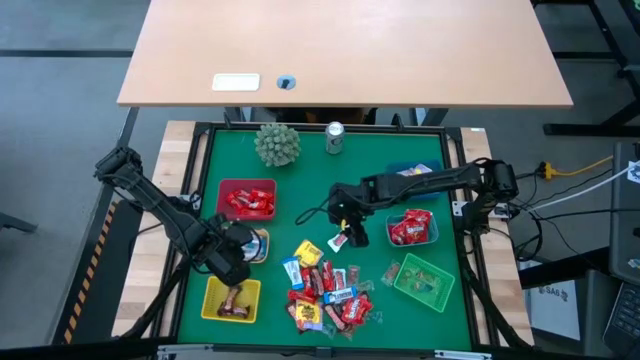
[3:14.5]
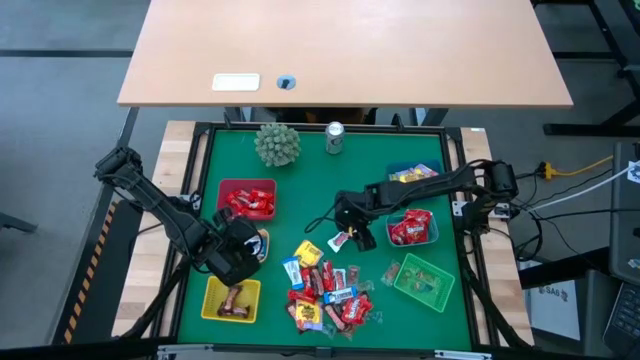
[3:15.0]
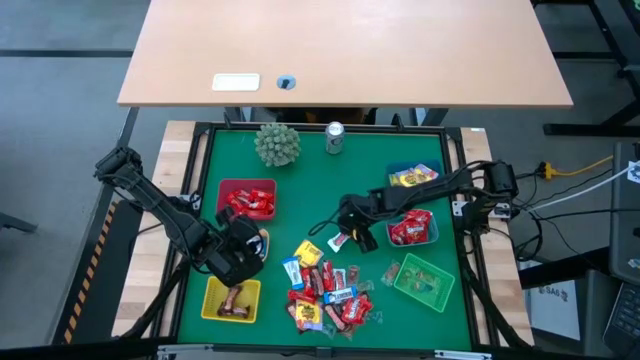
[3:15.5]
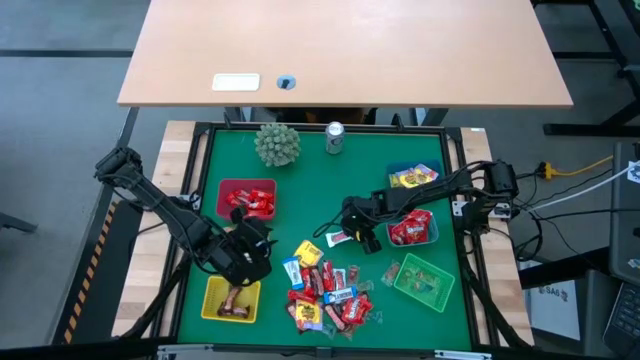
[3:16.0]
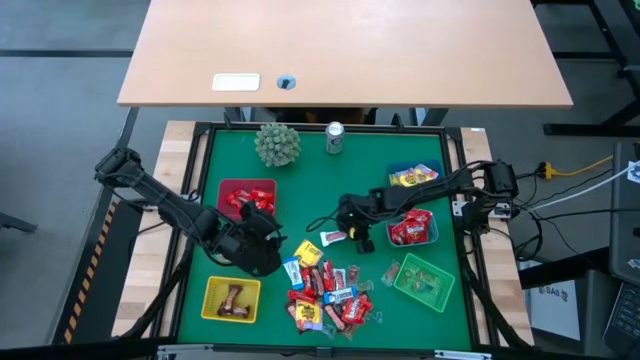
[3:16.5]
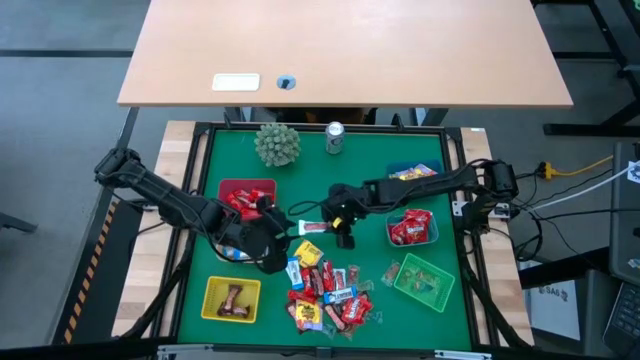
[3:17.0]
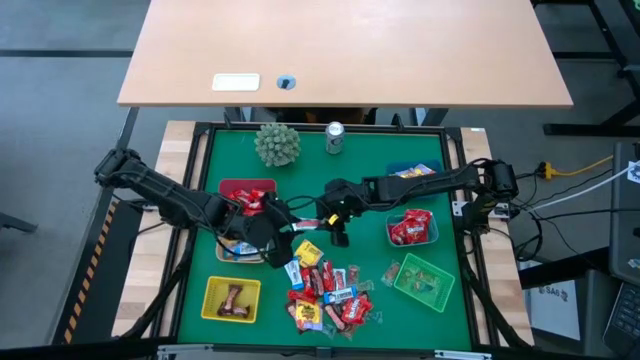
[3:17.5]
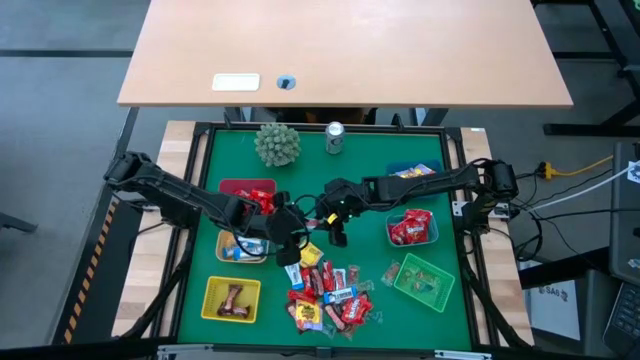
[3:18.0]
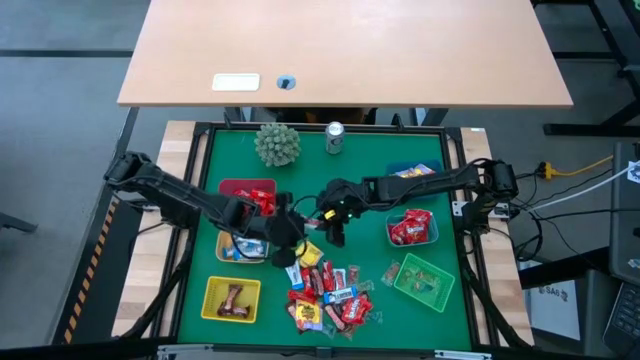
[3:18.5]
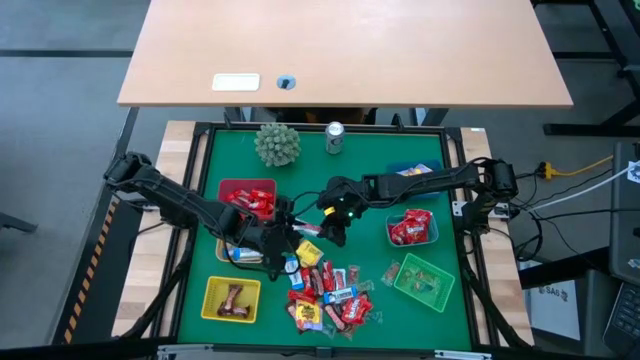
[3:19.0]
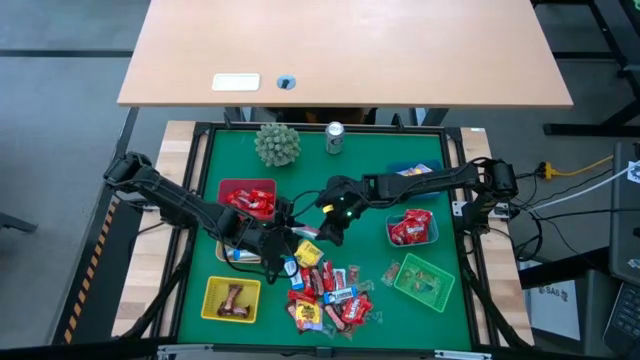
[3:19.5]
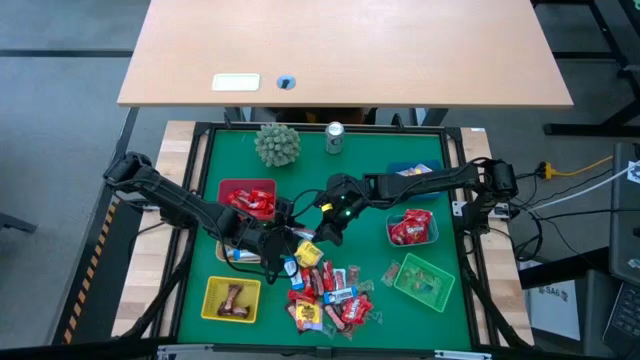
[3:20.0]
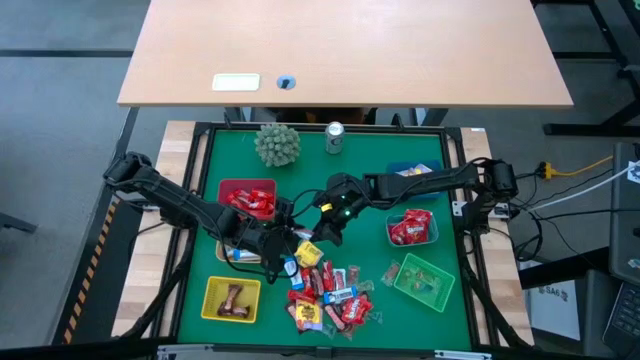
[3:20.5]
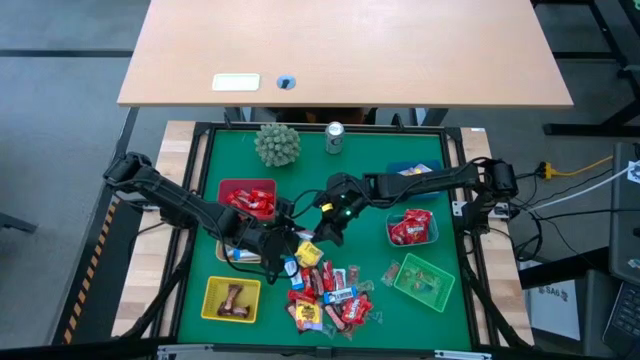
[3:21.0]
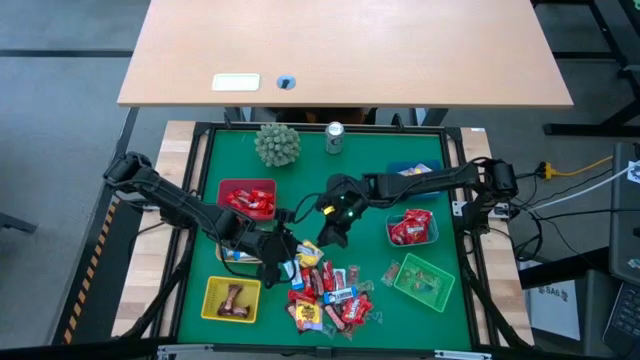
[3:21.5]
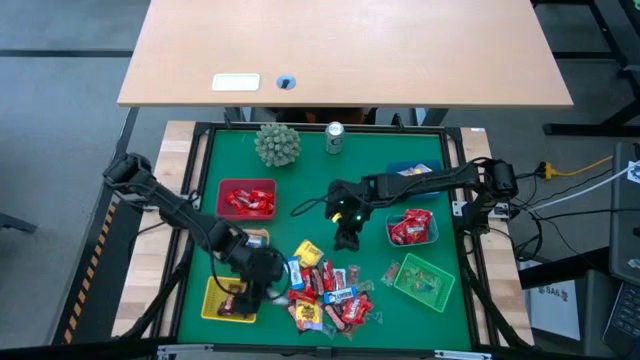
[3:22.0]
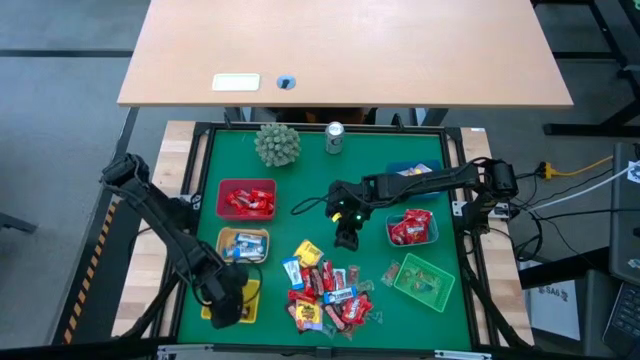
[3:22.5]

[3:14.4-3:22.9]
Task: Sort candy
Put the white-red chocolate bar into the yellow bin

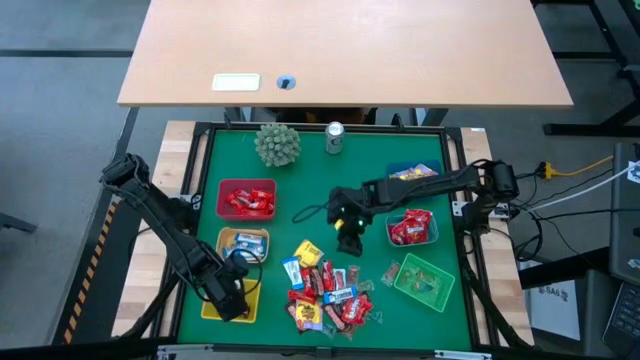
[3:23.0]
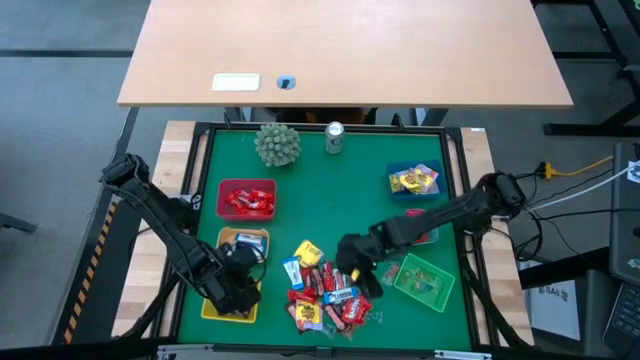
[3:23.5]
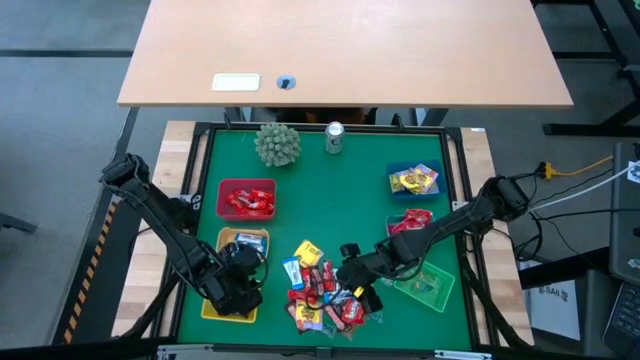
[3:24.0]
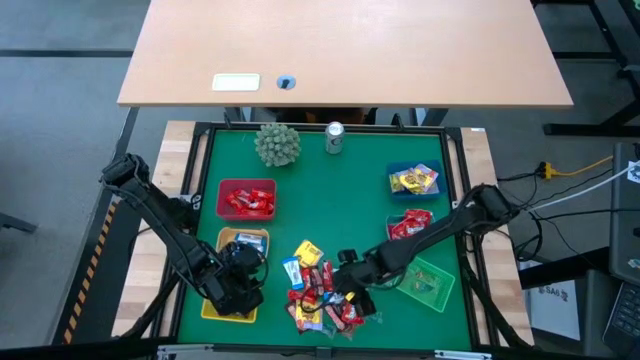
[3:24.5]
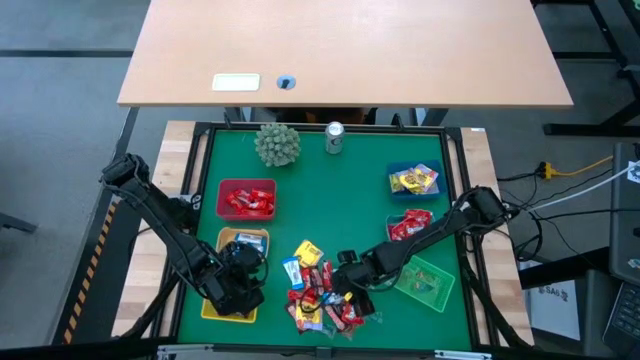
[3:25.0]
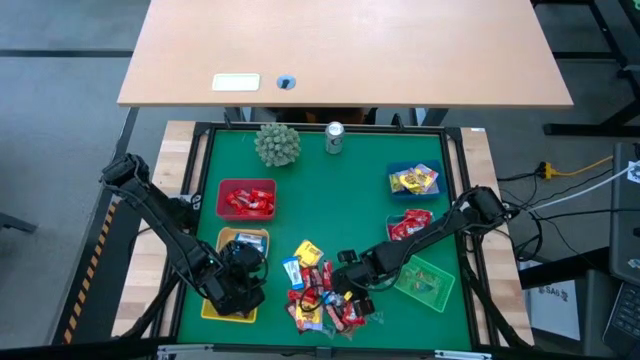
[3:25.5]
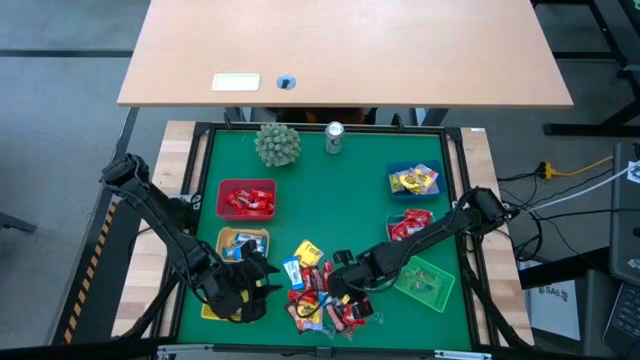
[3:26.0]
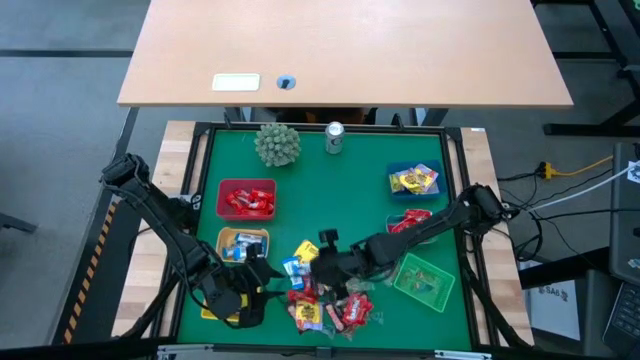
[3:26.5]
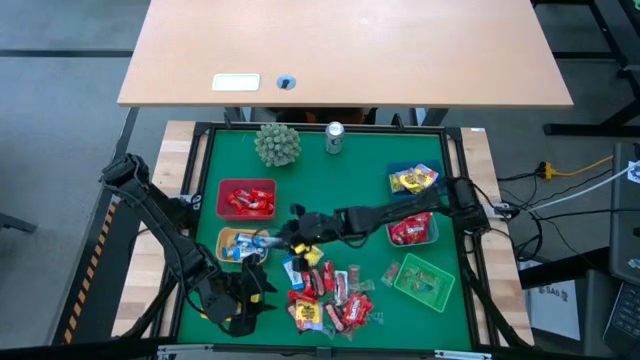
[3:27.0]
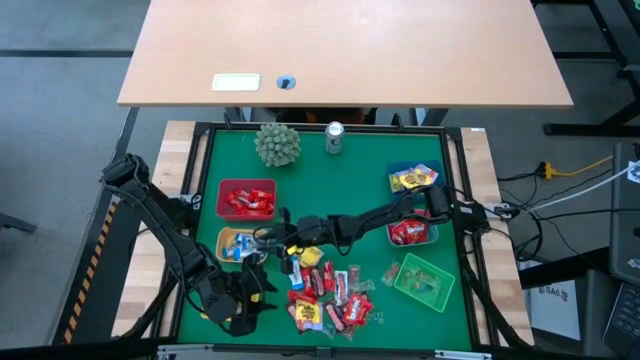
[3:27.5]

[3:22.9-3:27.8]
Put the white chocolate bar into the orange bin

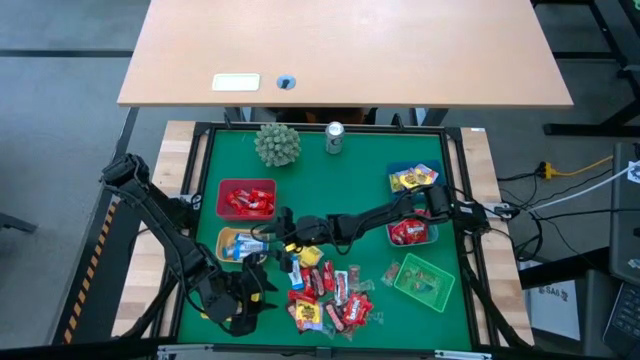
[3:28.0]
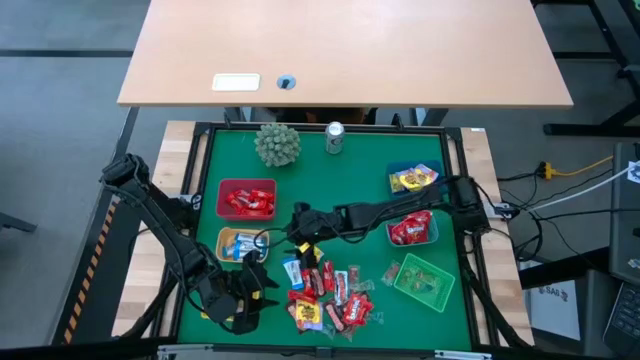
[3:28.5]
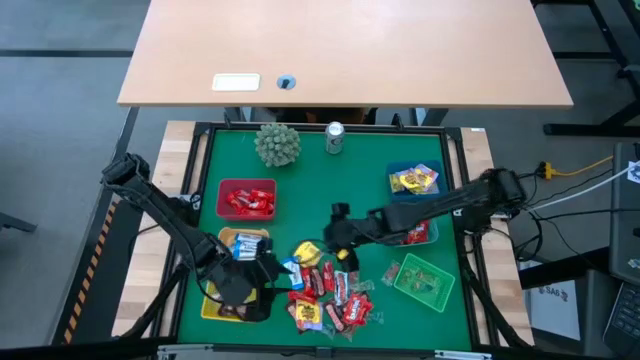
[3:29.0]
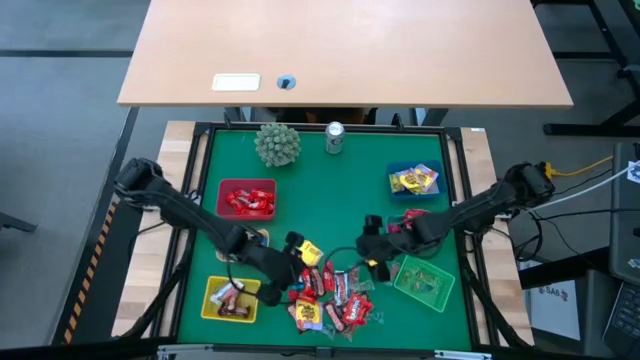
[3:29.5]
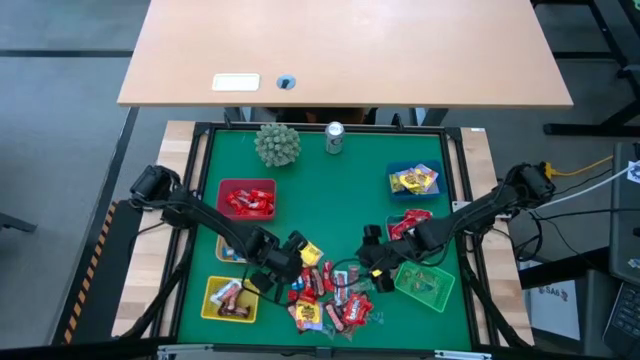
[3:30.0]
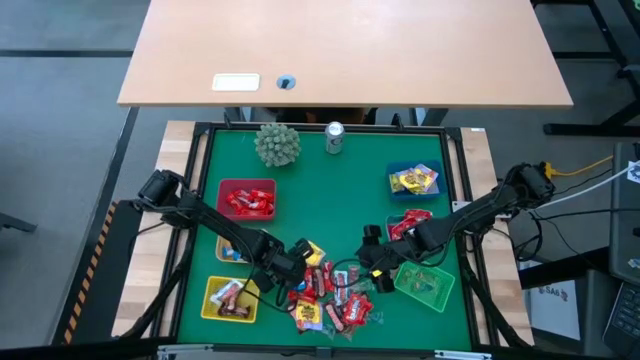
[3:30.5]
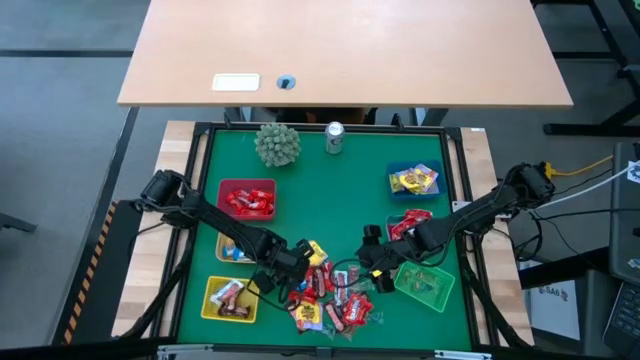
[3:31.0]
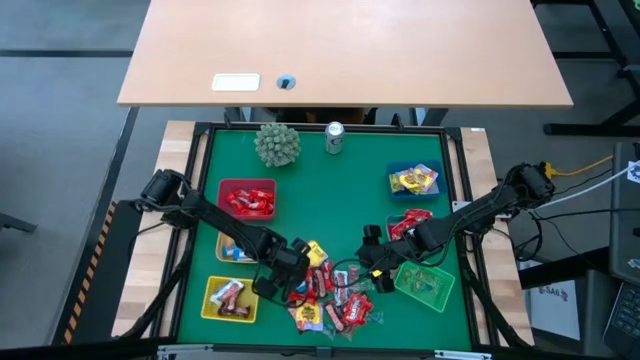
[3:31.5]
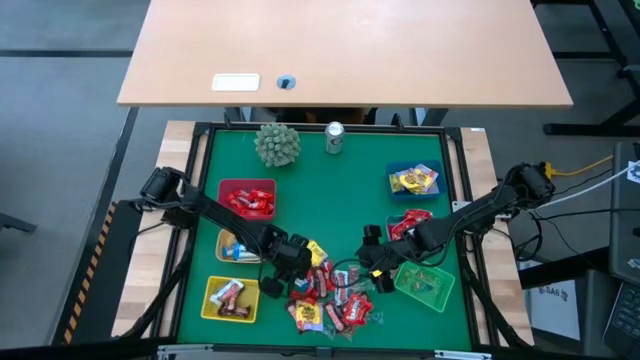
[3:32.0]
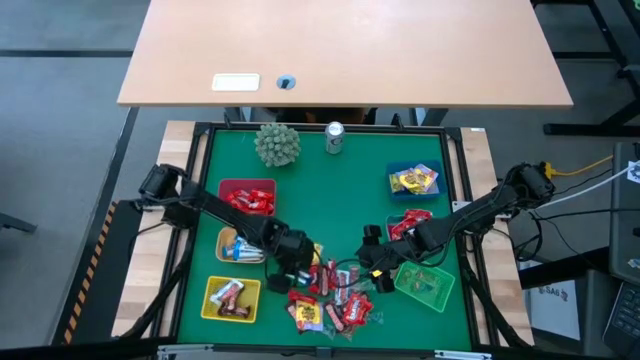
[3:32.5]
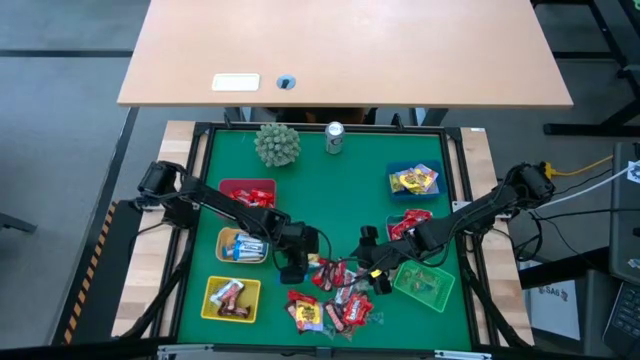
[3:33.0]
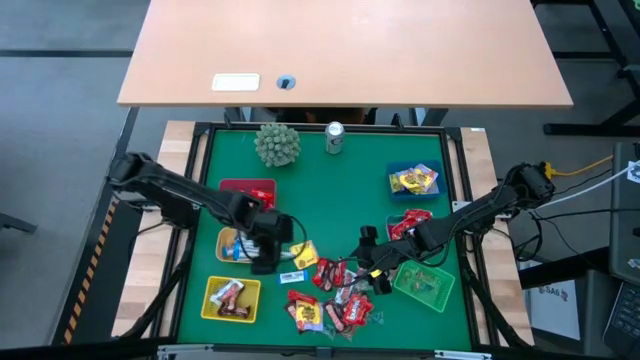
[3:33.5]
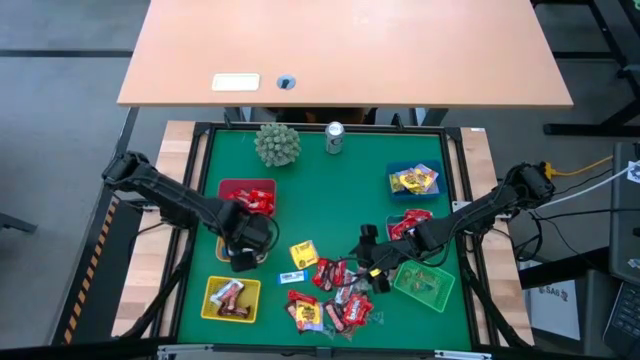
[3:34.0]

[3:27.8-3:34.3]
Put the white chocolate bar into the orange bin
